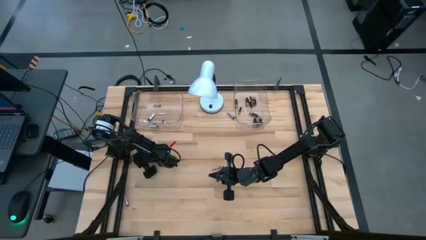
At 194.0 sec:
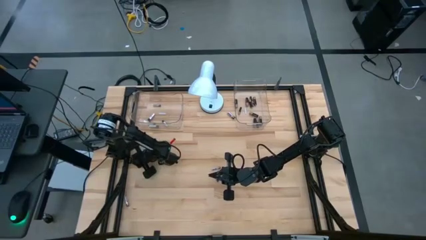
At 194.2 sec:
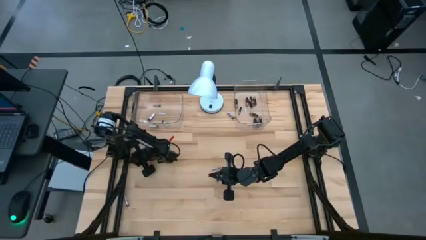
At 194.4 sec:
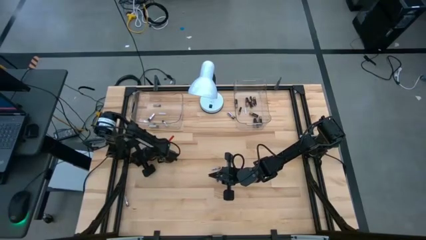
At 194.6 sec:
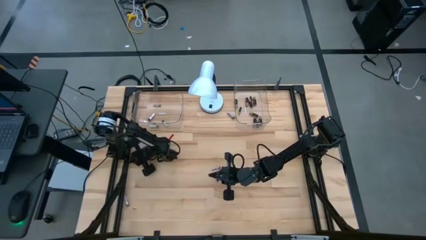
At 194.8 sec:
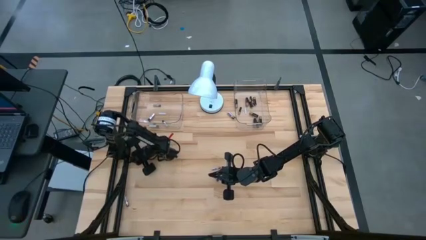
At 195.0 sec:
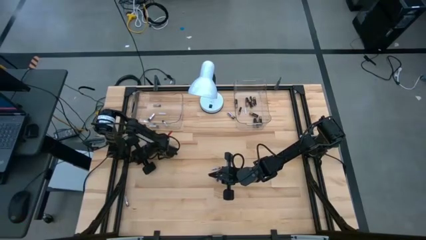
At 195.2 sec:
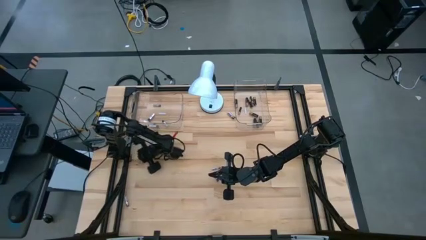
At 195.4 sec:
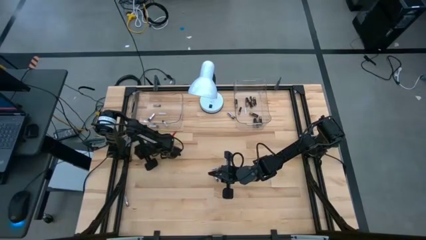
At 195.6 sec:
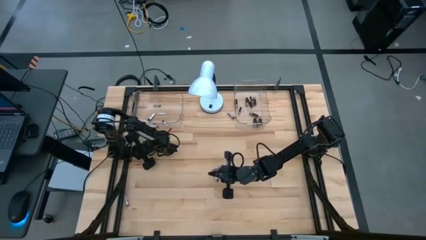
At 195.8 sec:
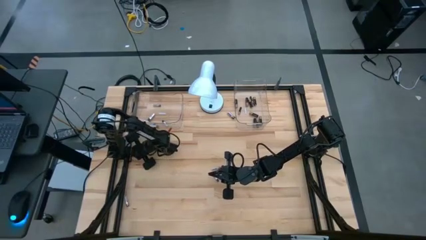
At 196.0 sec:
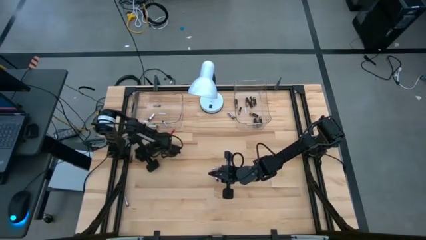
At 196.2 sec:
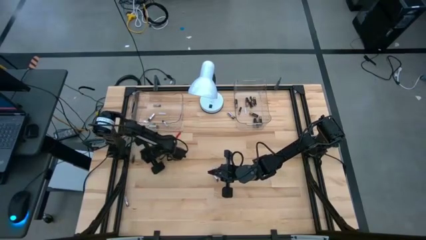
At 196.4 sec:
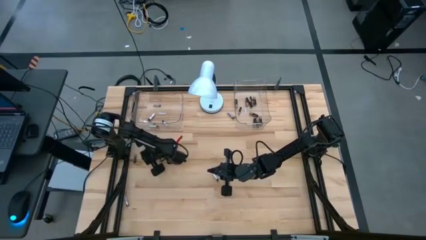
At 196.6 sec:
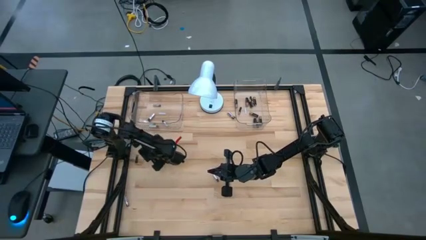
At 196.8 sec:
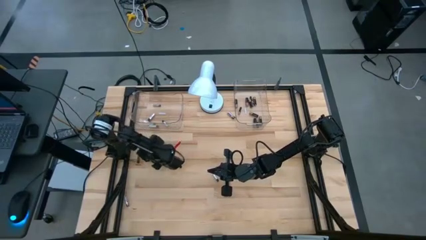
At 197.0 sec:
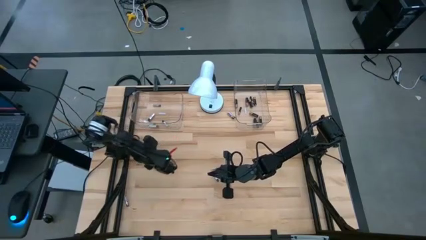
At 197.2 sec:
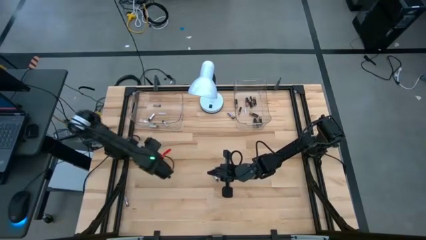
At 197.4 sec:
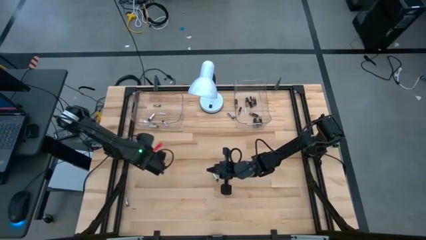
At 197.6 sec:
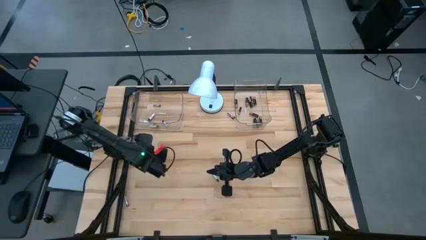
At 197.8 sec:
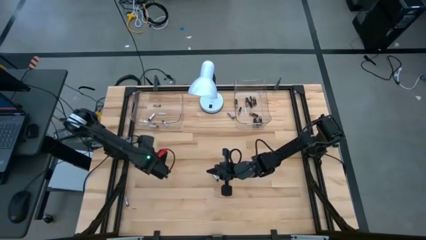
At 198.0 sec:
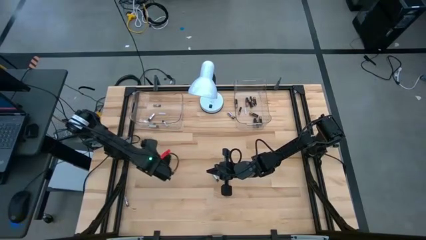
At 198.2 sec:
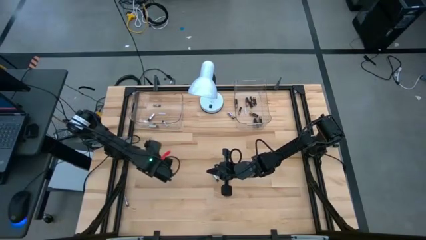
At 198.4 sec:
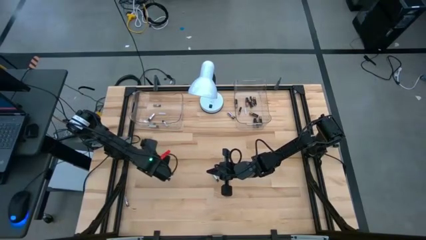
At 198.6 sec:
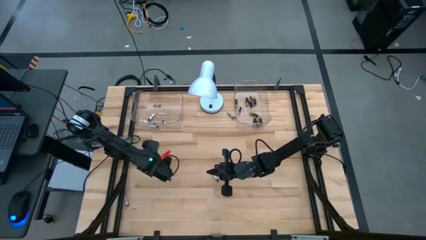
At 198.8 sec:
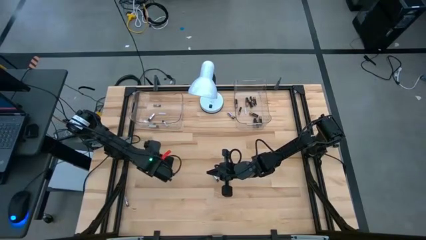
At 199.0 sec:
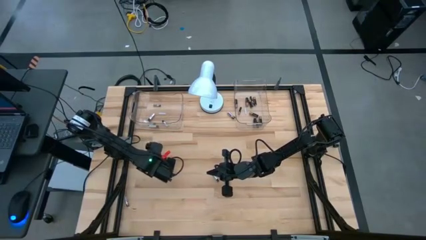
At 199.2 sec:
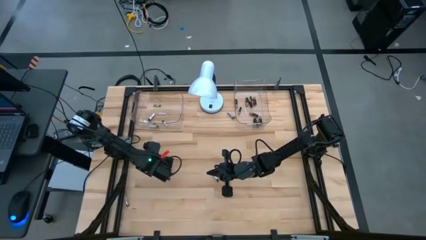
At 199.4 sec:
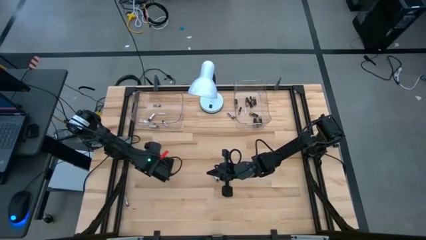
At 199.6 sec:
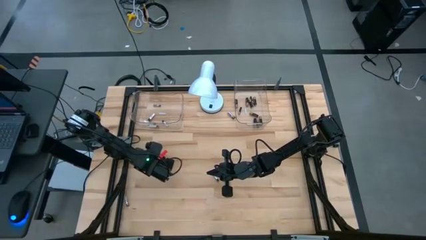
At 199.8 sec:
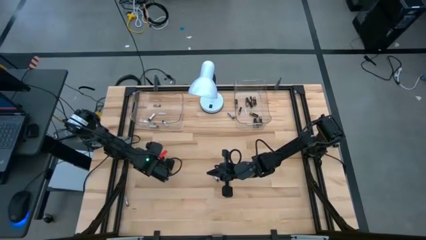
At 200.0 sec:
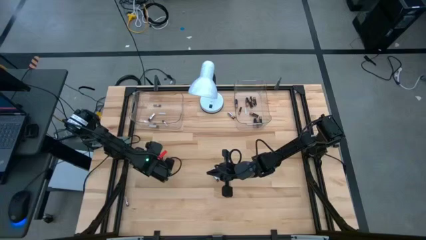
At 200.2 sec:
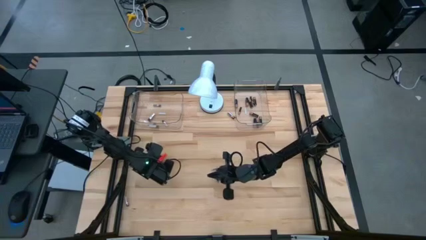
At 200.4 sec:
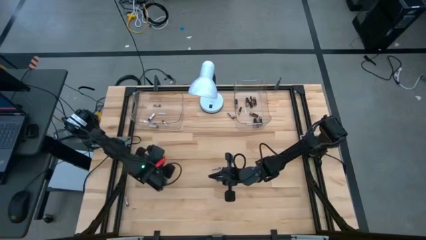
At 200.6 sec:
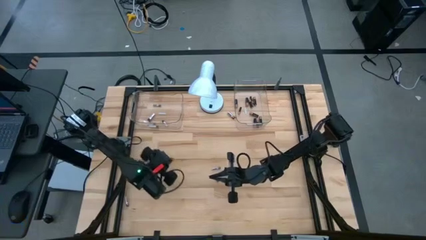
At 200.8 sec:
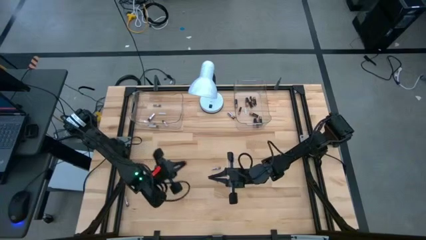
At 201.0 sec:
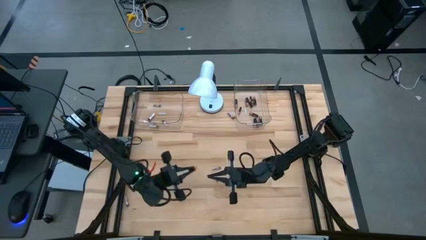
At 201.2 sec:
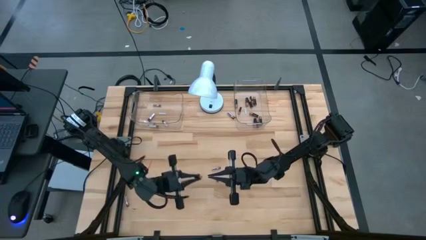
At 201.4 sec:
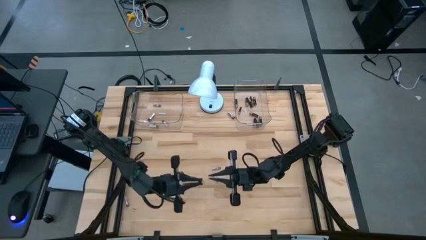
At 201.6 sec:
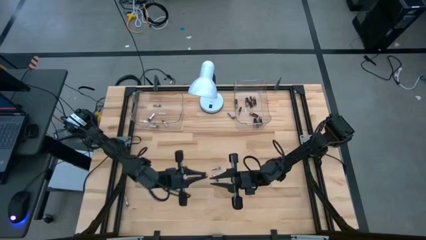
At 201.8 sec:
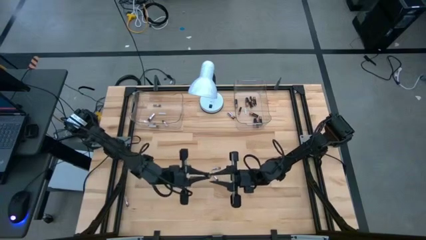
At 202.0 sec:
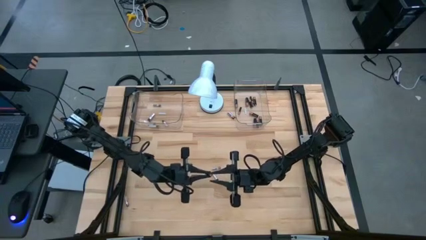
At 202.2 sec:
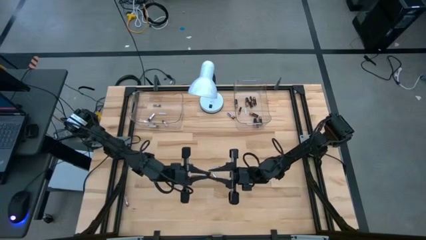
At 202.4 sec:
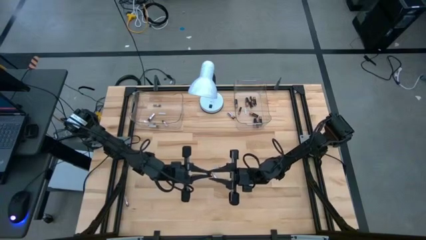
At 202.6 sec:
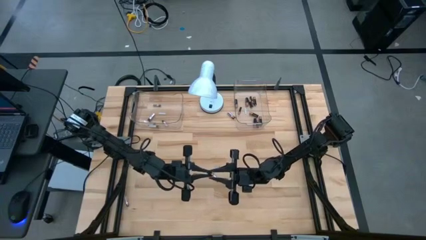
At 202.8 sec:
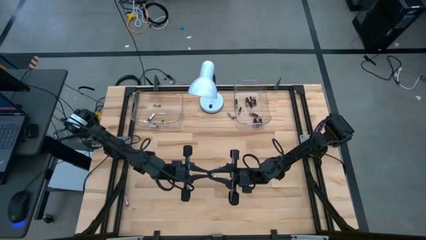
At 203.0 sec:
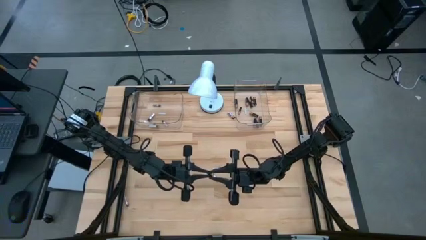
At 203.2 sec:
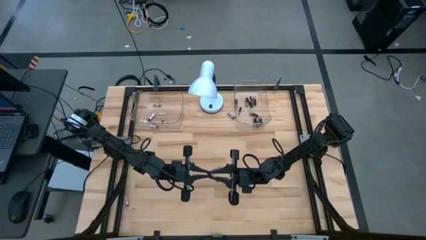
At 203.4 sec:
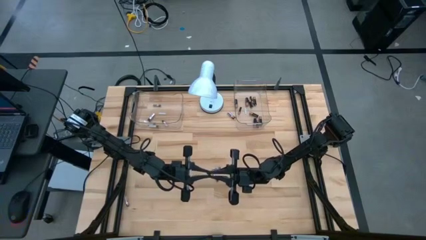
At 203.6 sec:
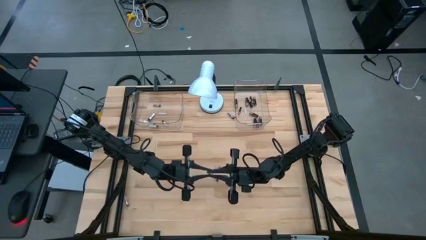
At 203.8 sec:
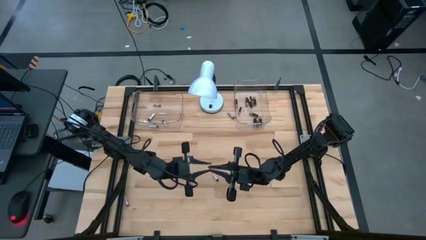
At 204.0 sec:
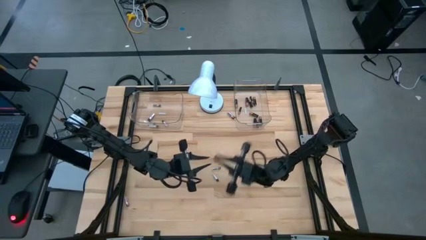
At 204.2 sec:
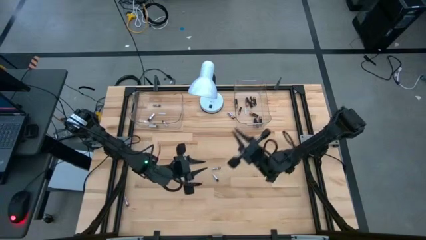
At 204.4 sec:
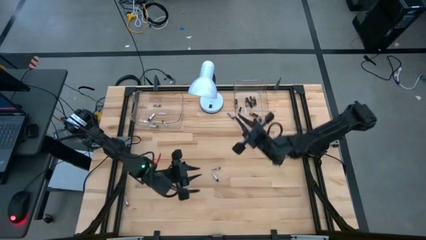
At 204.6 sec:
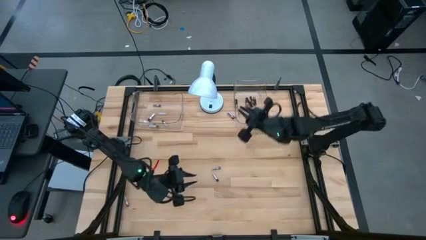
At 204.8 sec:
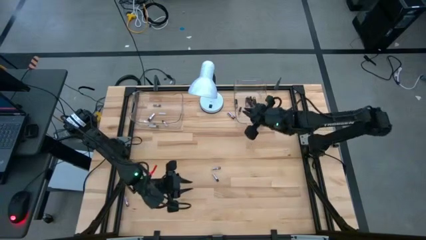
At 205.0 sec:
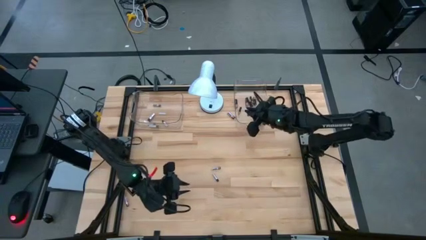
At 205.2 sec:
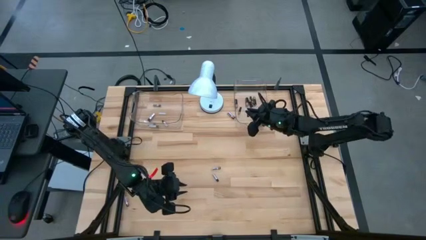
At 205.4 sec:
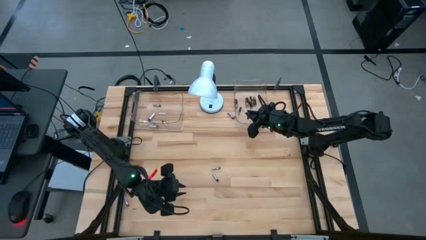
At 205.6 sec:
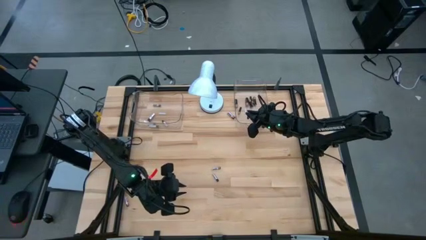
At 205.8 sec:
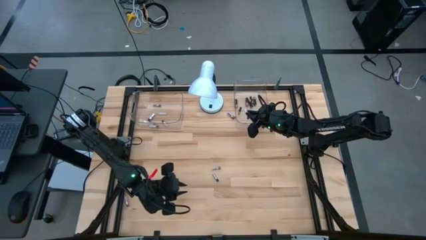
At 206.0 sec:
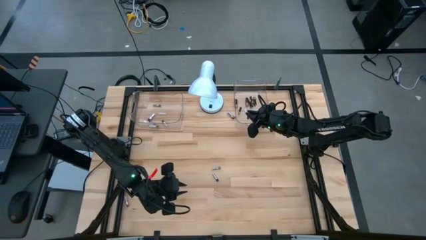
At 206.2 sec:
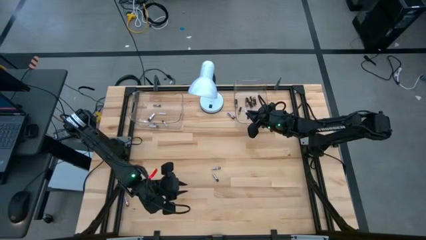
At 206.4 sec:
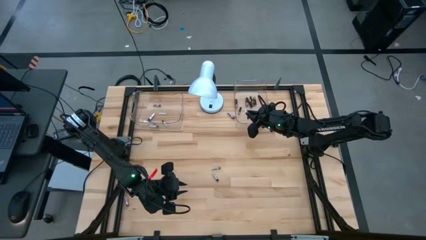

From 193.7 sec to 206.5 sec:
Task: Sort batteries
Put the black battery in the transparent bin

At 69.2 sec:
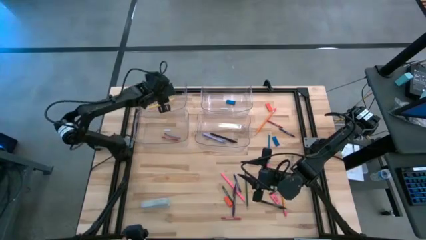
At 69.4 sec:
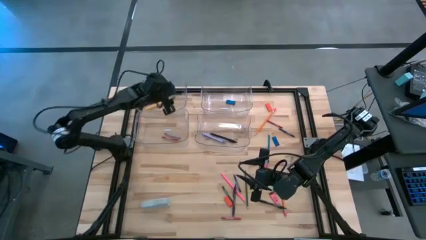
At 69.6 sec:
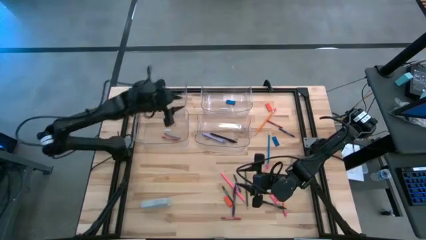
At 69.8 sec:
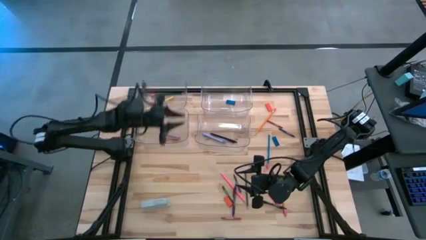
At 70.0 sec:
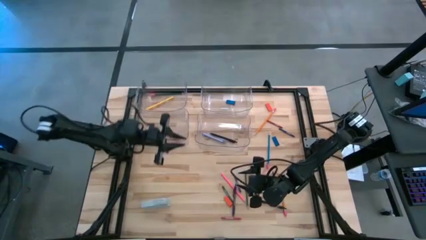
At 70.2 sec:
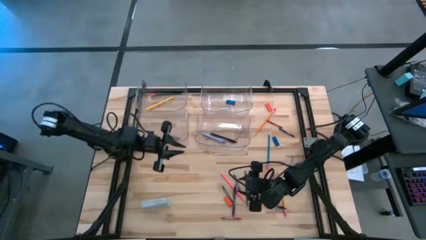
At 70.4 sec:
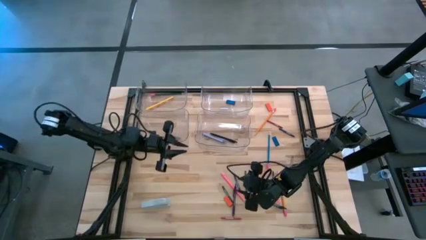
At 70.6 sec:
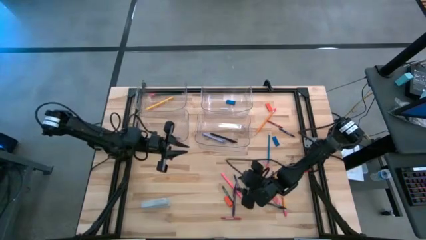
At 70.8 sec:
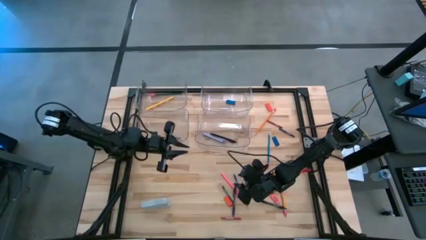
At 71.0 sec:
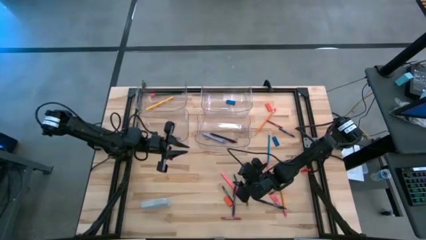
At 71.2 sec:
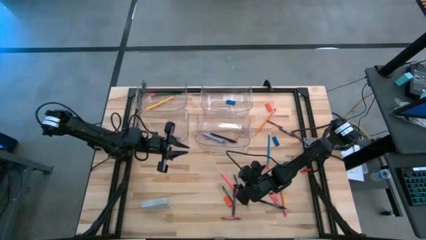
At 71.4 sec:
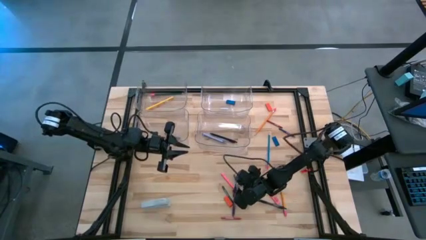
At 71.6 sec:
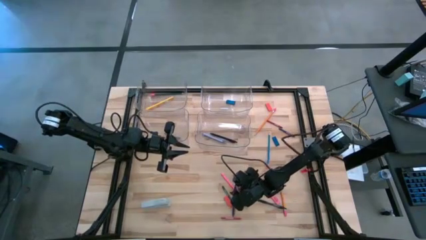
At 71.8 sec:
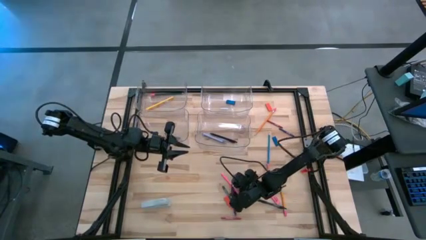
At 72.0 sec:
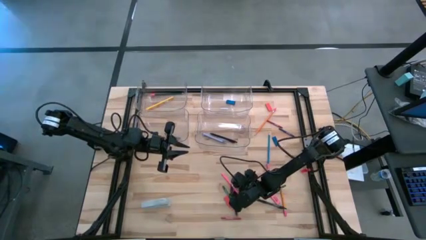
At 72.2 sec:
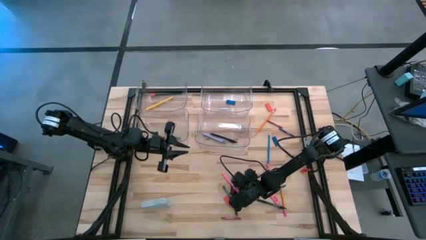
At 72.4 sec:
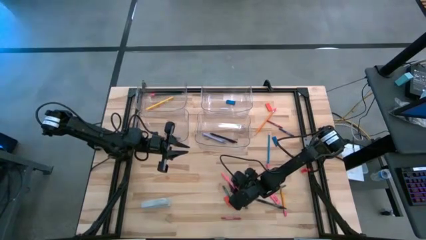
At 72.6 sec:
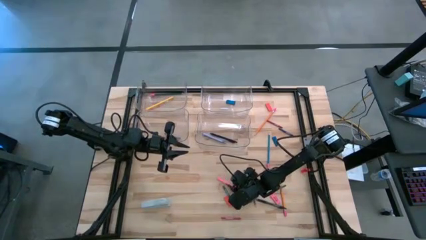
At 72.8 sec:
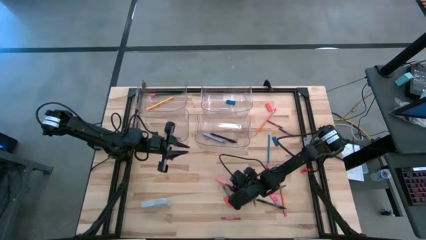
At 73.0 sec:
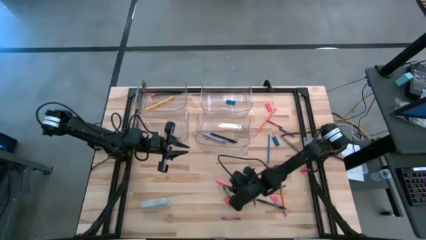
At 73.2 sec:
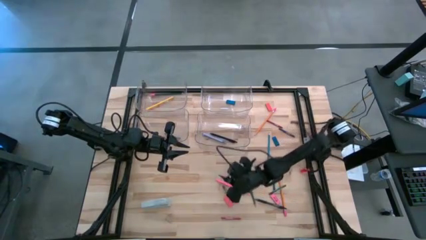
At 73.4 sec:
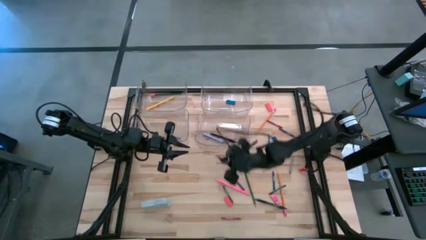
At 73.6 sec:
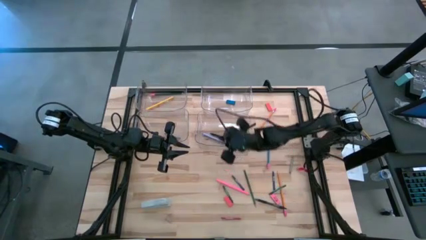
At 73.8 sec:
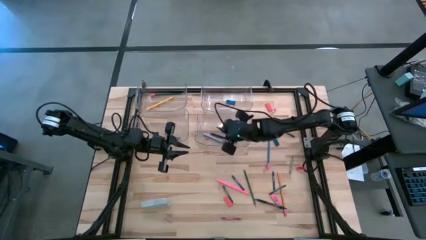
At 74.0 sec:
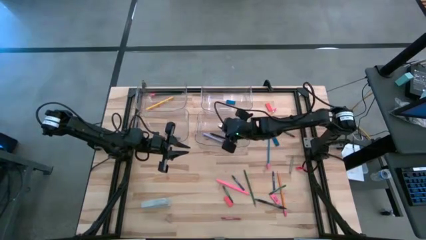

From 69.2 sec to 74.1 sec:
Task: Sort crayons/erasers/pens/pencils in bins
Put the purple pen into the bottom right transparent bin
